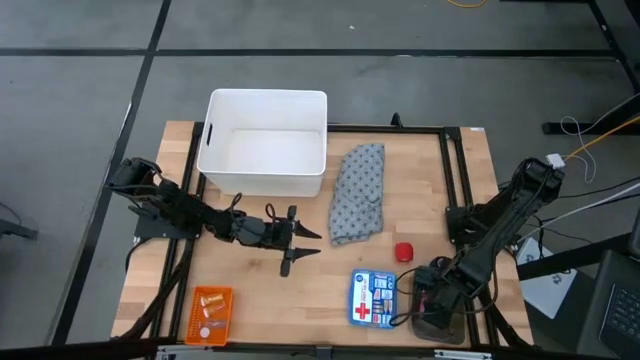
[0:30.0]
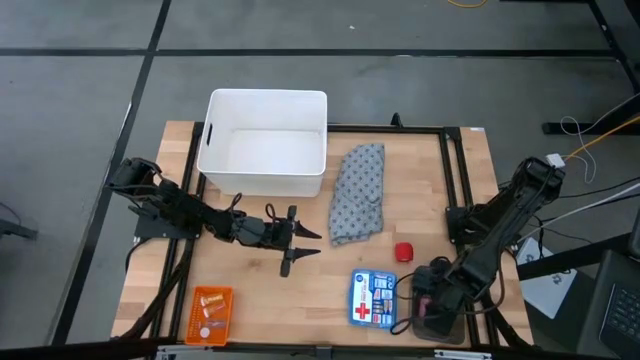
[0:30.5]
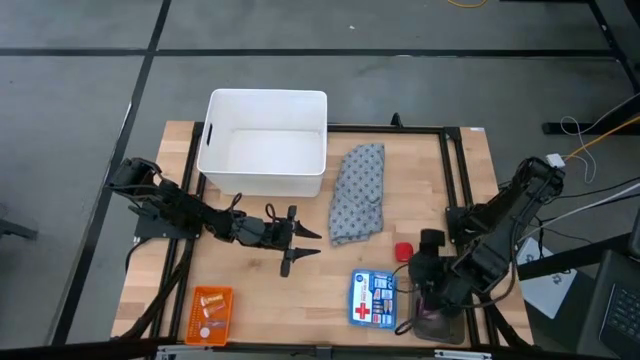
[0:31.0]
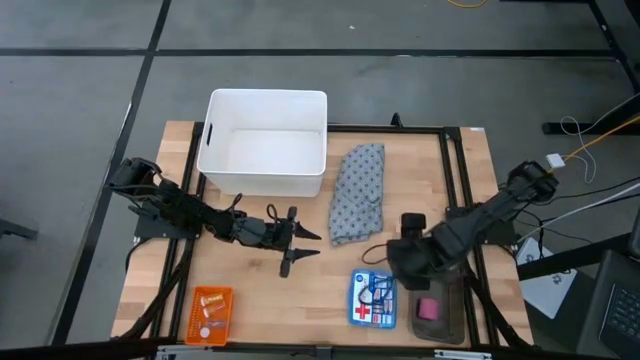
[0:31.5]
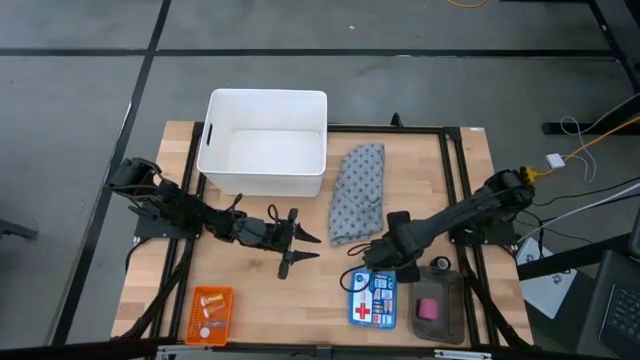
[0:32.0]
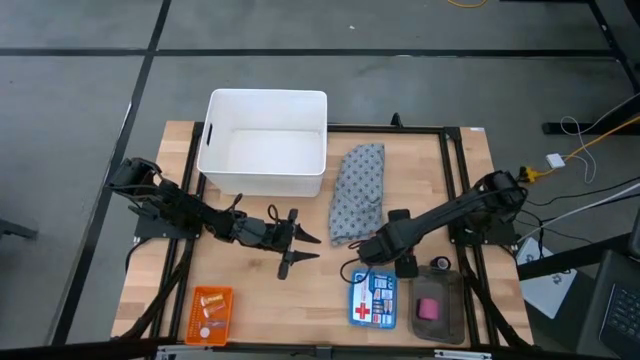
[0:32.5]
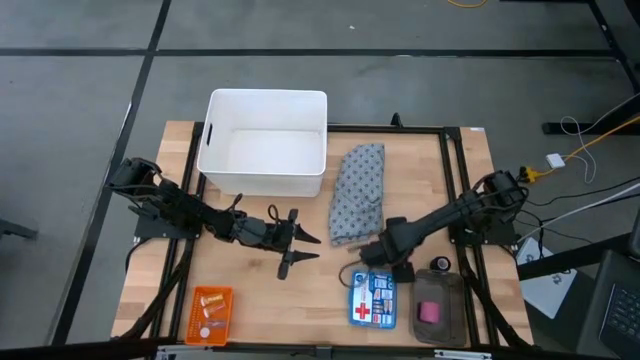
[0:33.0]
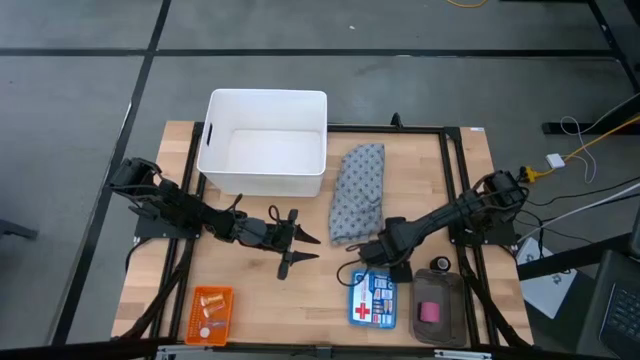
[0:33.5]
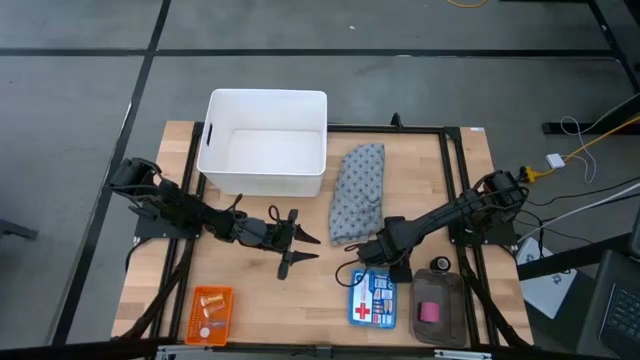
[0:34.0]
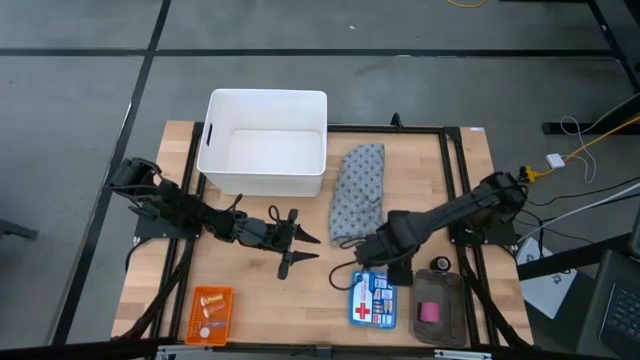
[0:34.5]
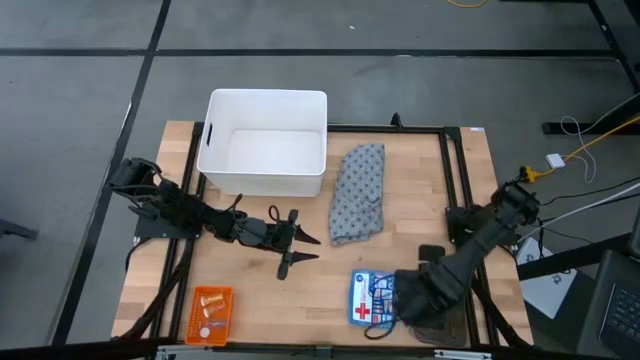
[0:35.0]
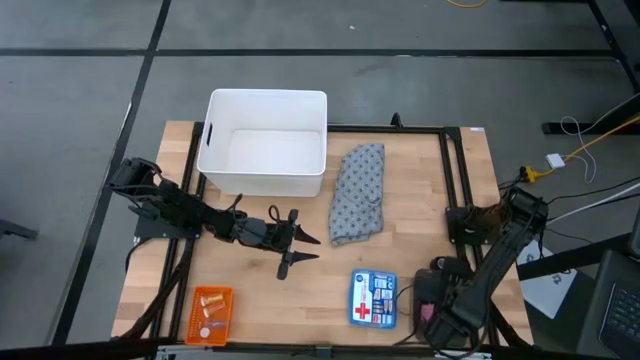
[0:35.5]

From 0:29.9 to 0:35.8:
Task: Pick & place medical supplies in basket/bin
Put the red bandage into the black bin

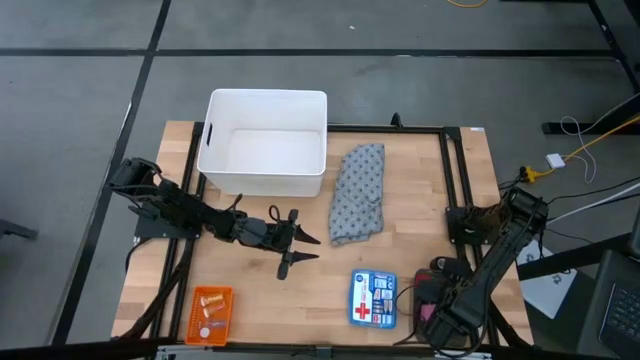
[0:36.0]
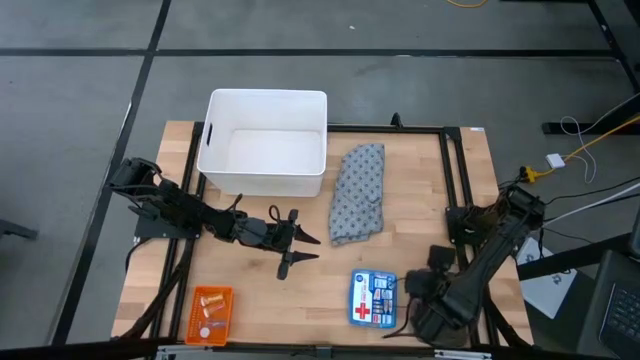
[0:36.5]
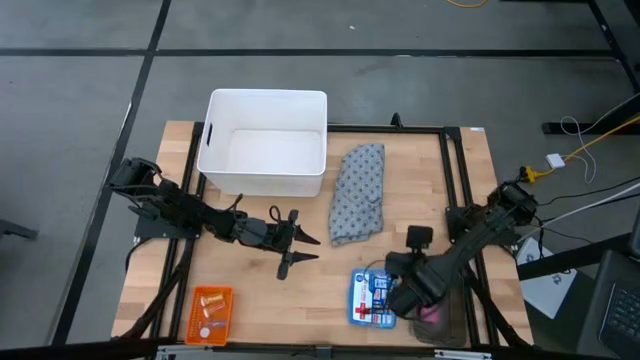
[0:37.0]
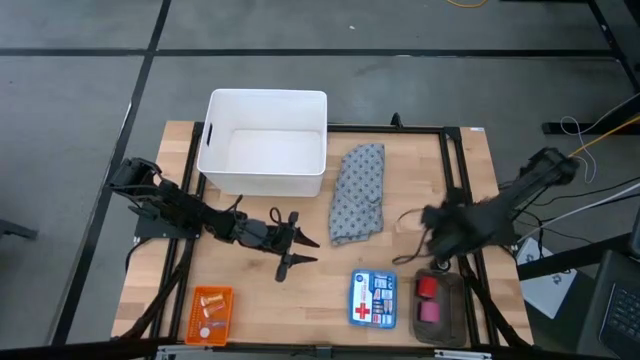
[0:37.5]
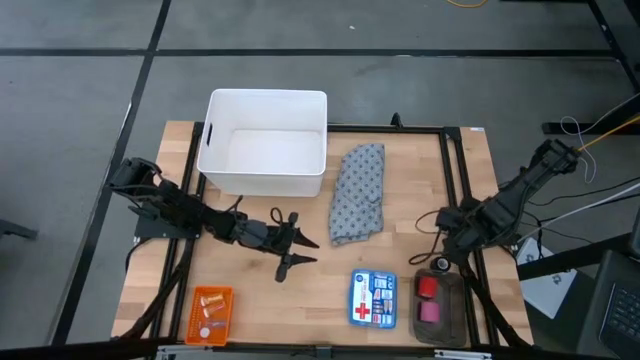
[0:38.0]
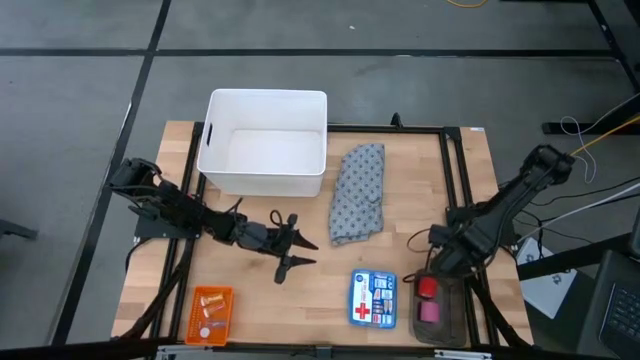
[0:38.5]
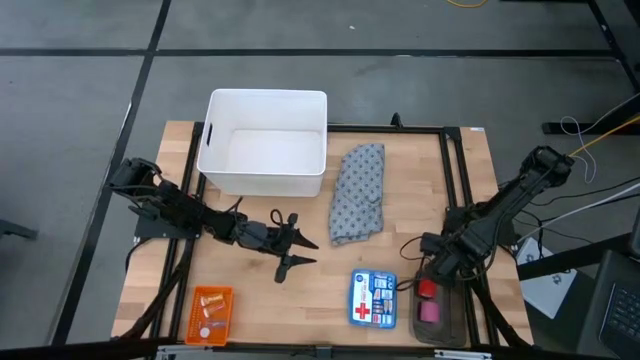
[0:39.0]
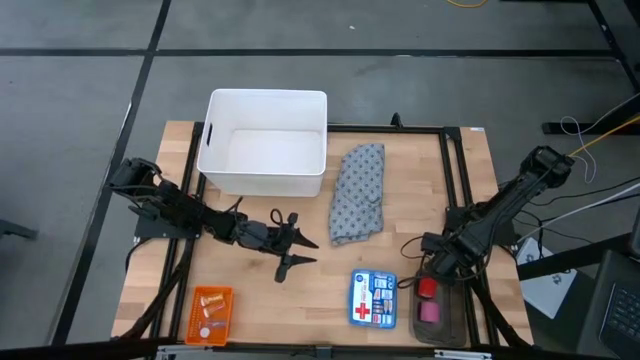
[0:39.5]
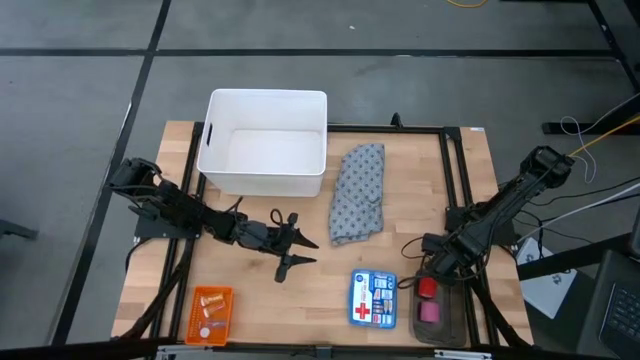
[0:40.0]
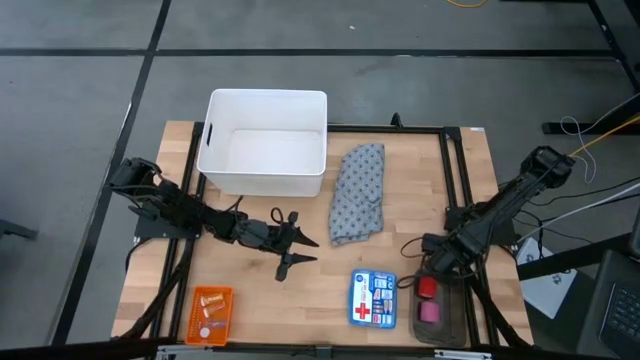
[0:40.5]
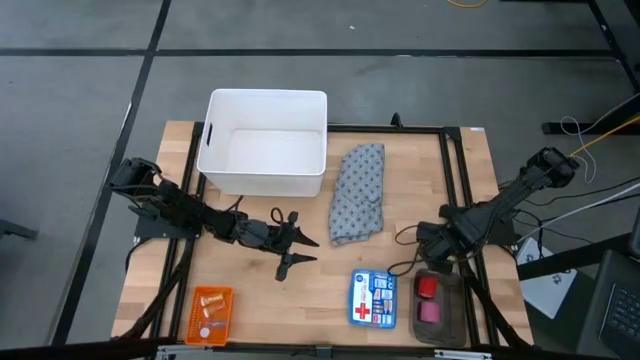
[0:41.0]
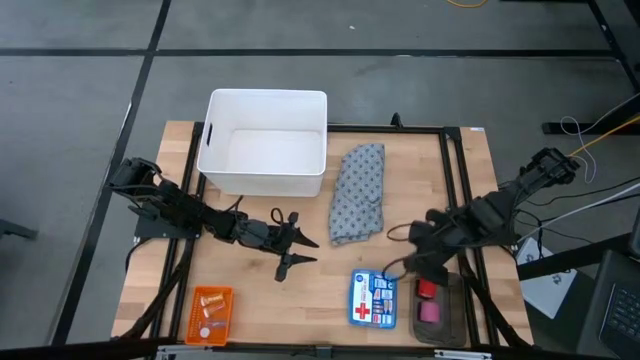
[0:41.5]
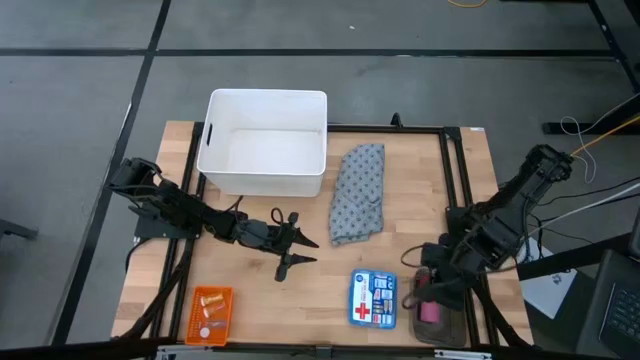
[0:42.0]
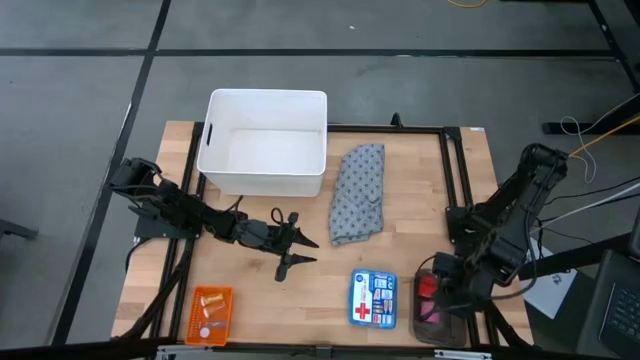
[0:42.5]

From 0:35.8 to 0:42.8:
Put the black bandage into the black bin

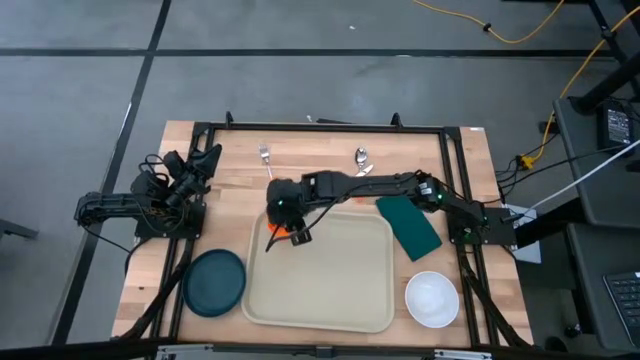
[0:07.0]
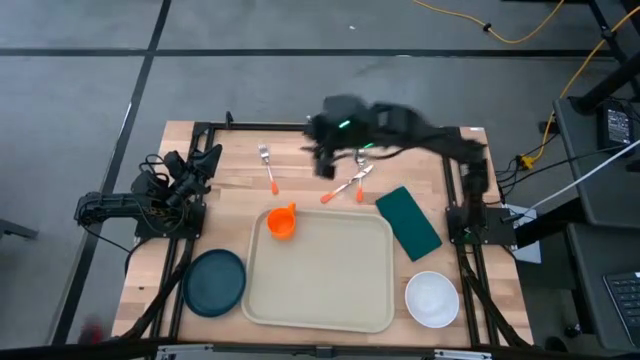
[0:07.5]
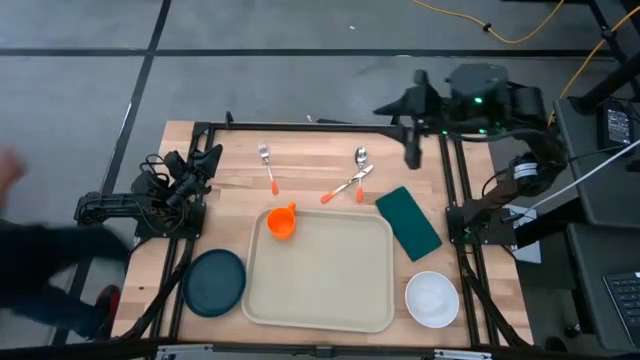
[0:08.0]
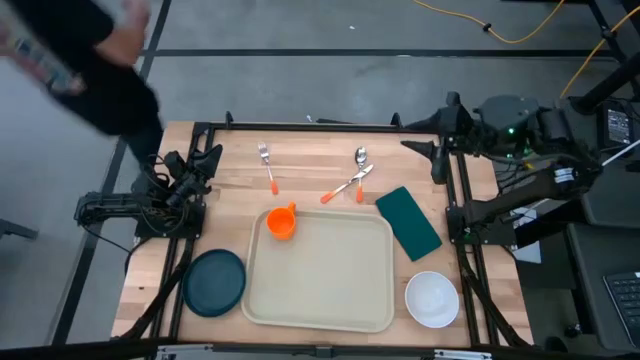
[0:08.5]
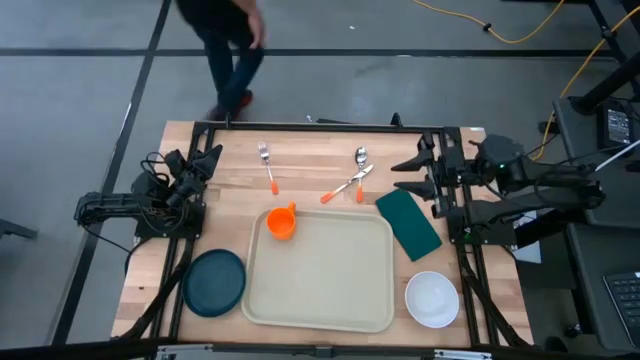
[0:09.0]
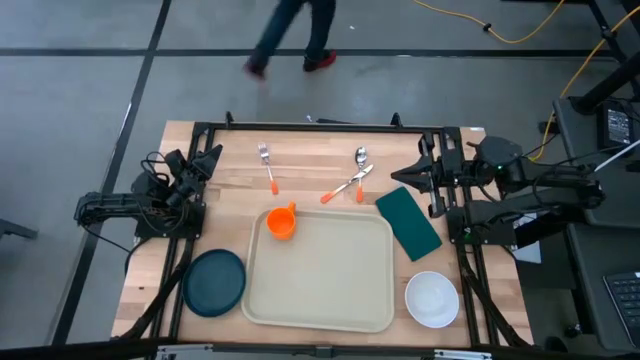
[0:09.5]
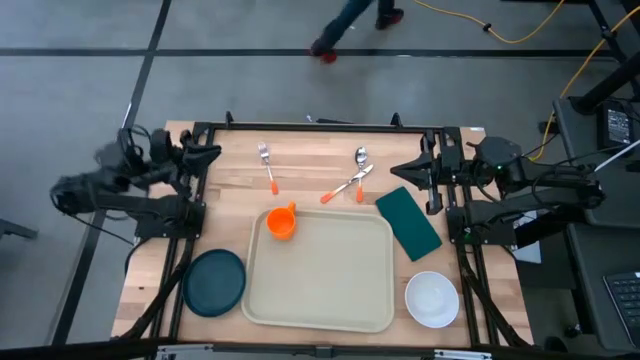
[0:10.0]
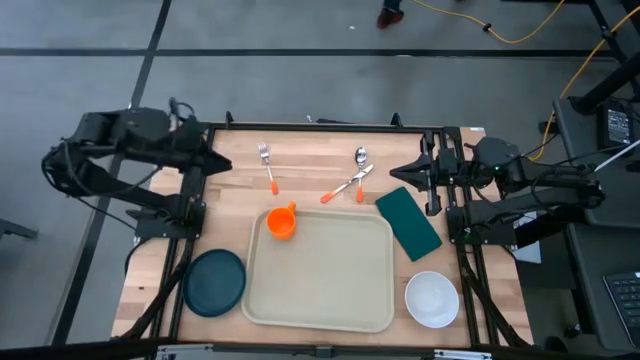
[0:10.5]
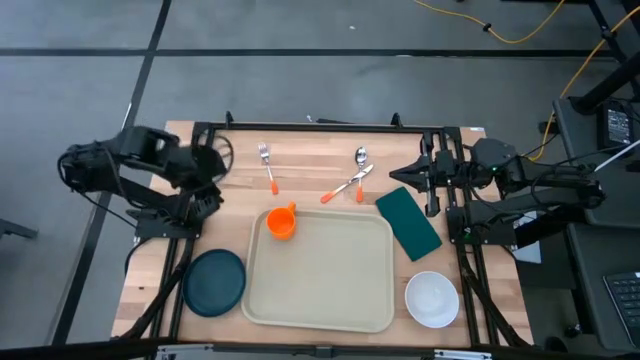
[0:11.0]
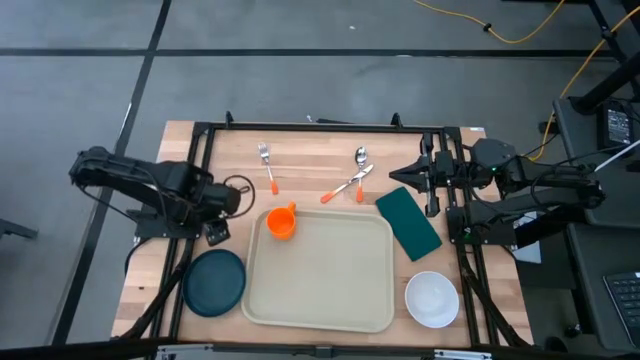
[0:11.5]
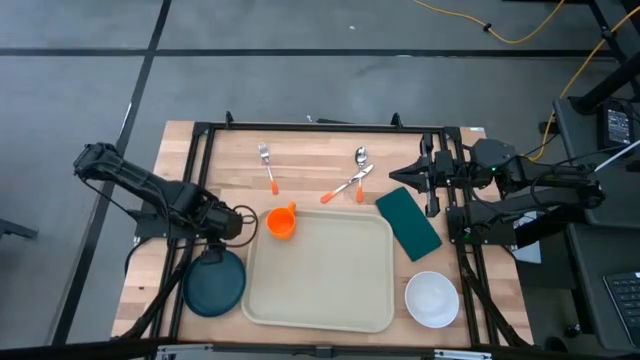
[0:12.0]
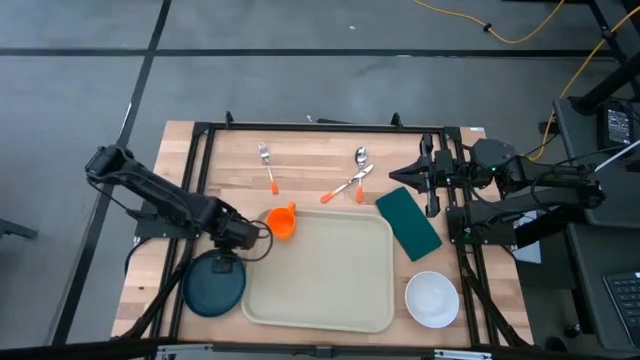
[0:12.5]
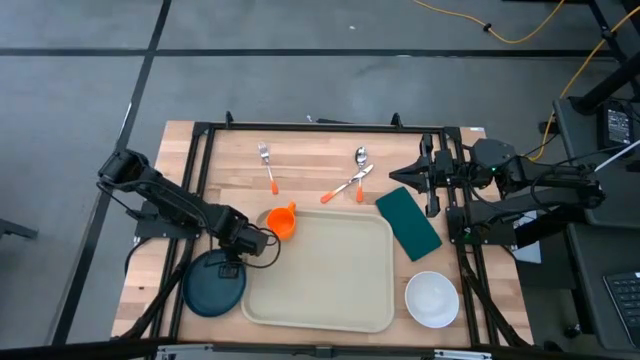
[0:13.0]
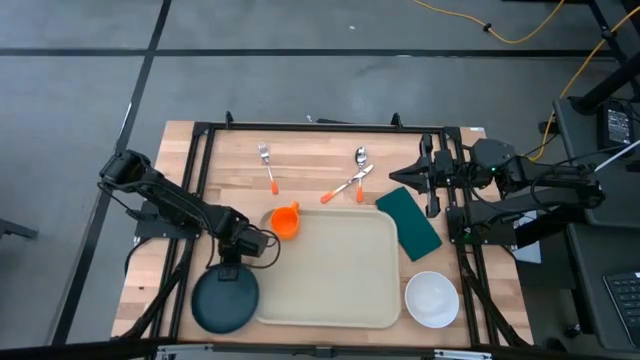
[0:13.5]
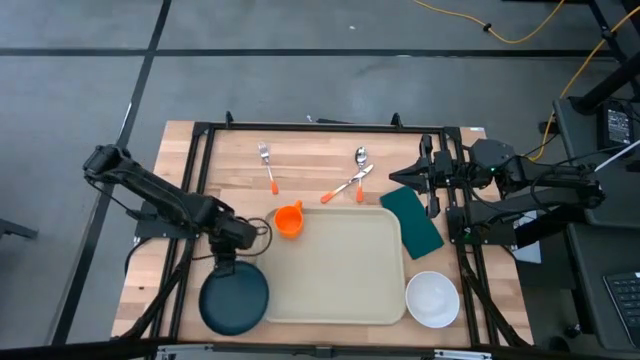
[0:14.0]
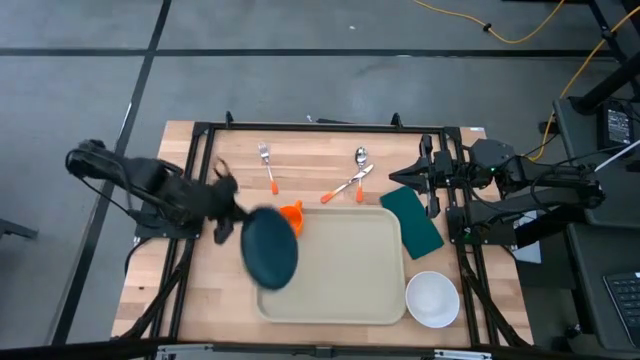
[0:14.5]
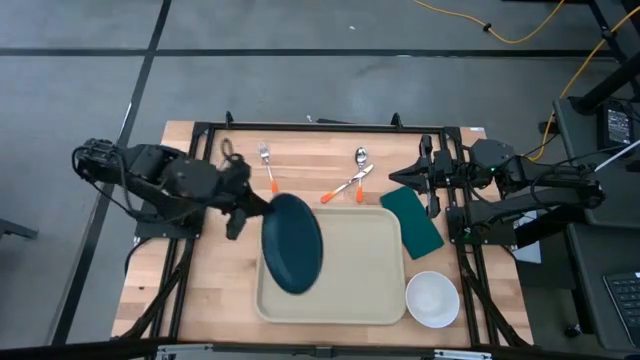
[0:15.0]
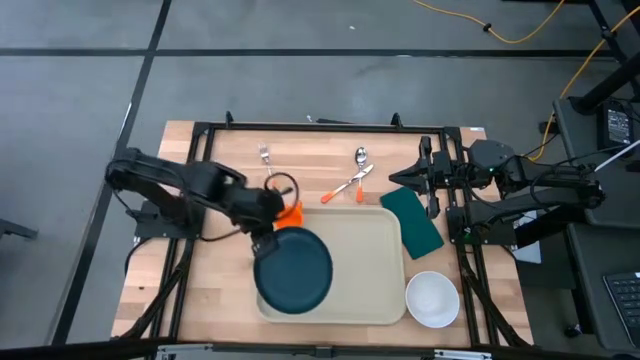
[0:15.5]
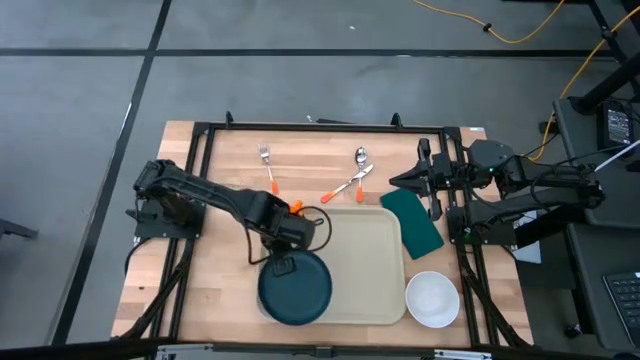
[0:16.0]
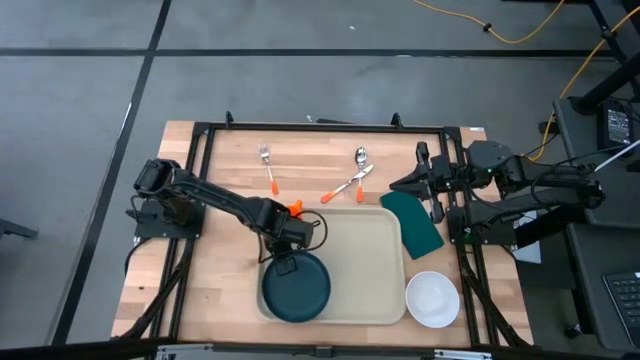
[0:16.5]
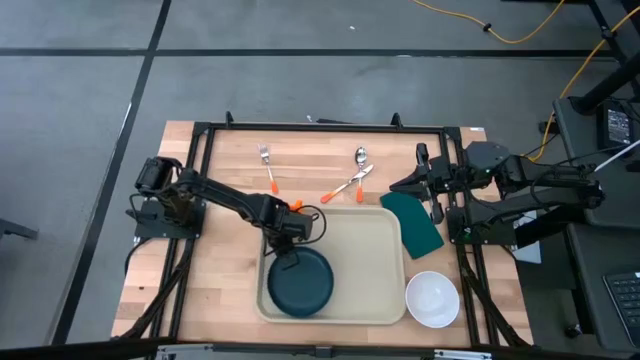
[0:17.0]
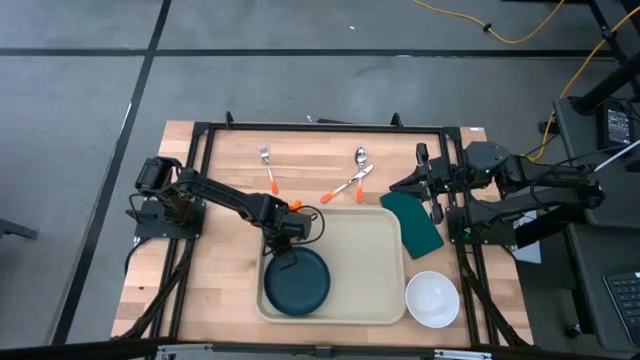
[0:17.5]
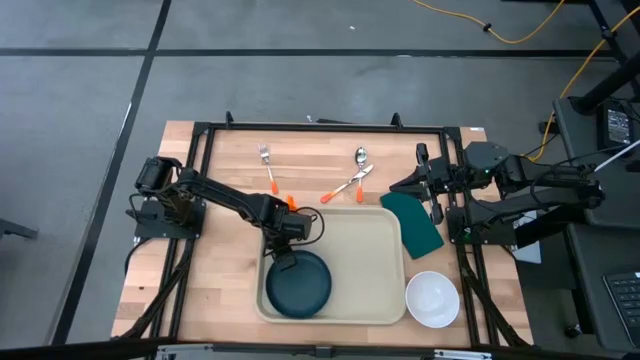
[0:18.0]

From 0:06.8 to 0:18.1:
Task: Set up tray
Put the blue plate on the light brown serving tray to the bottom of the orange mug
